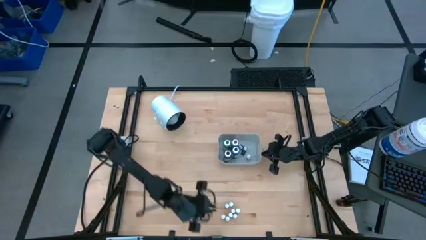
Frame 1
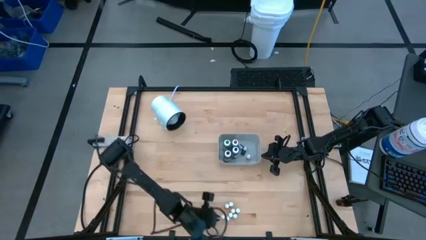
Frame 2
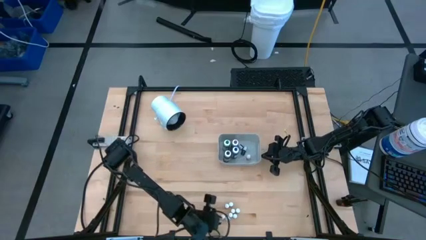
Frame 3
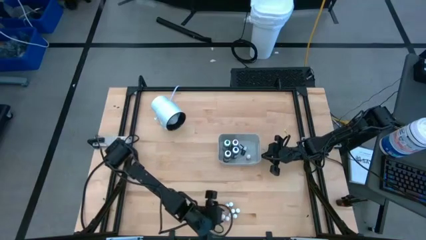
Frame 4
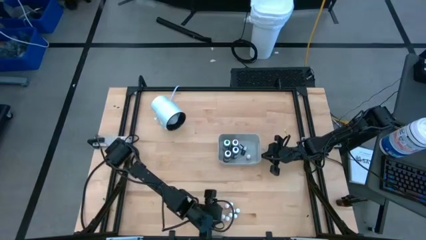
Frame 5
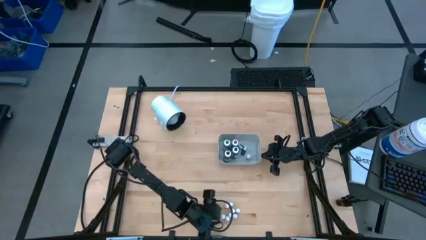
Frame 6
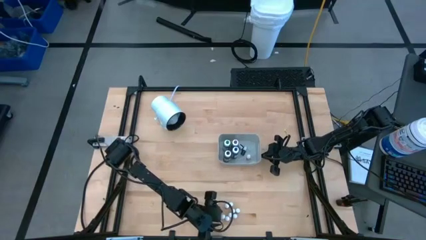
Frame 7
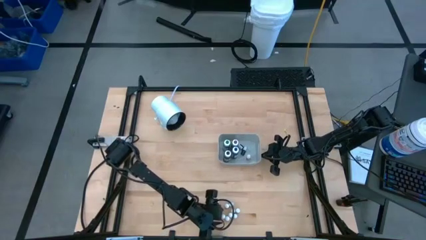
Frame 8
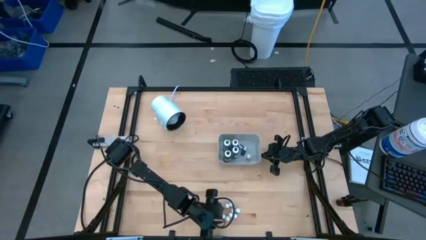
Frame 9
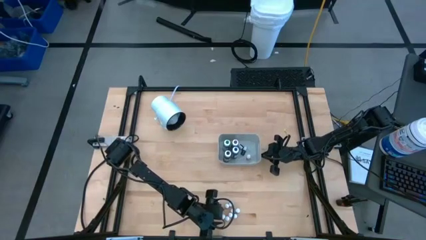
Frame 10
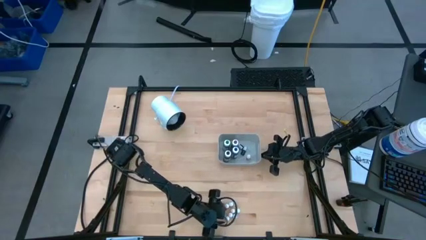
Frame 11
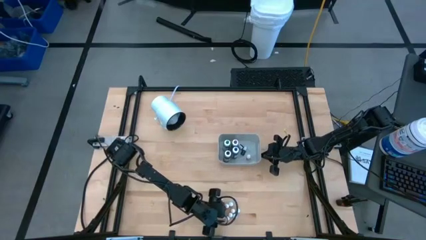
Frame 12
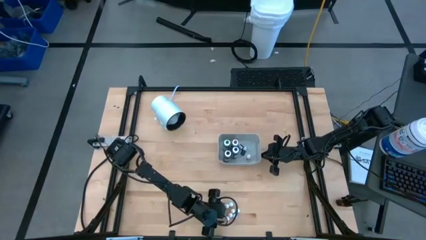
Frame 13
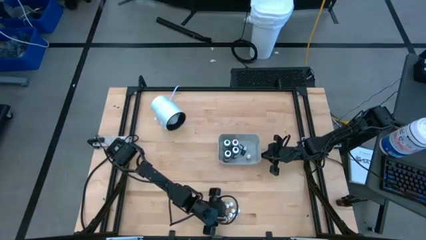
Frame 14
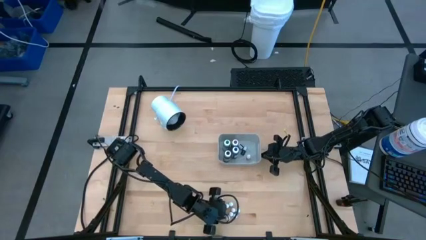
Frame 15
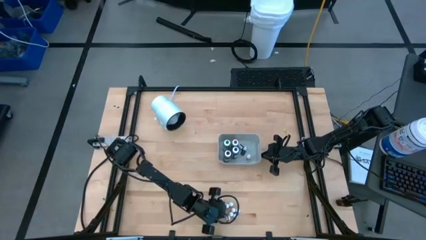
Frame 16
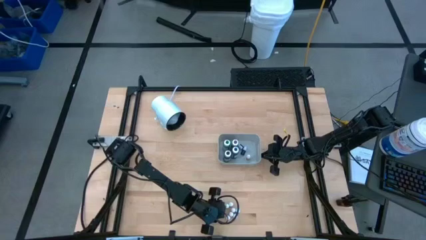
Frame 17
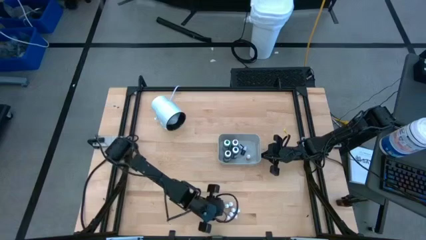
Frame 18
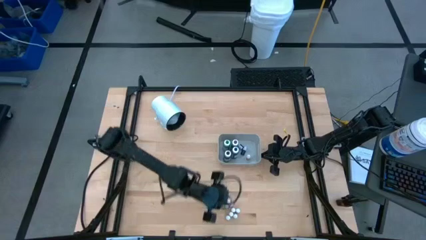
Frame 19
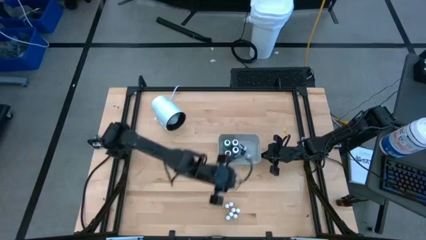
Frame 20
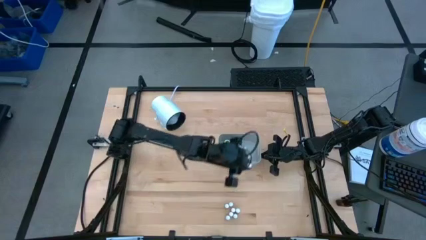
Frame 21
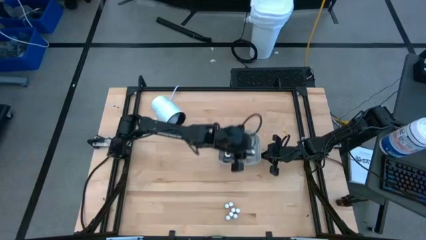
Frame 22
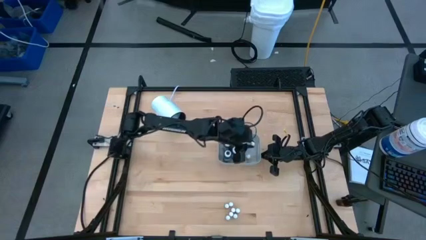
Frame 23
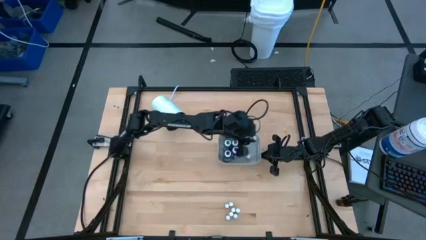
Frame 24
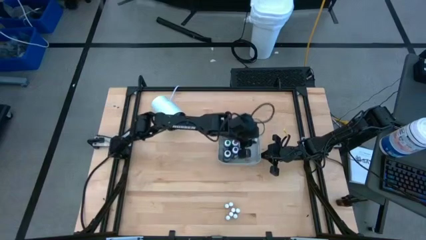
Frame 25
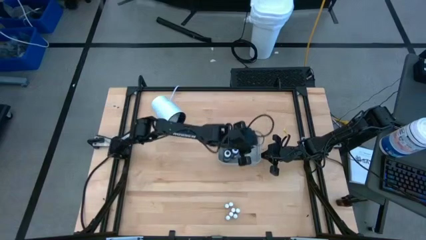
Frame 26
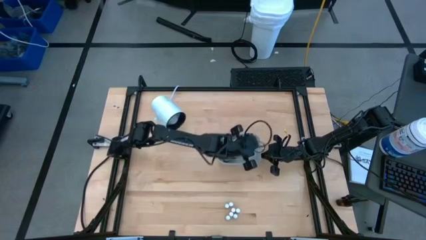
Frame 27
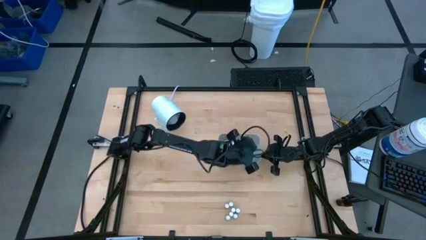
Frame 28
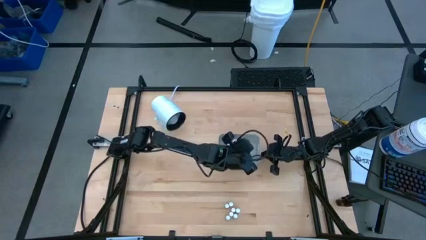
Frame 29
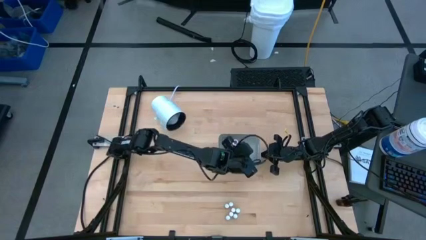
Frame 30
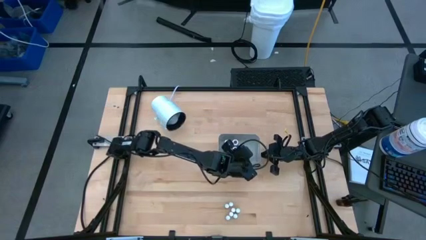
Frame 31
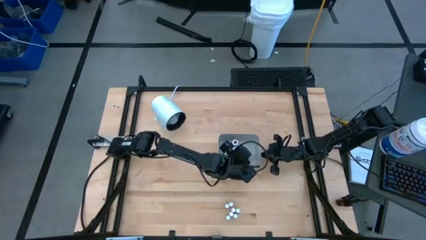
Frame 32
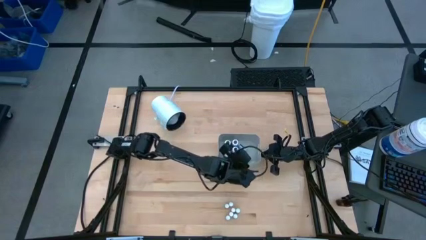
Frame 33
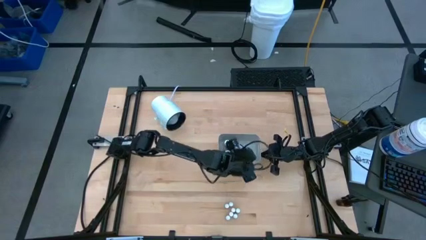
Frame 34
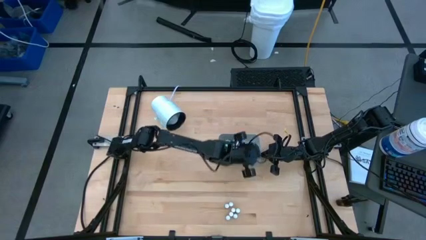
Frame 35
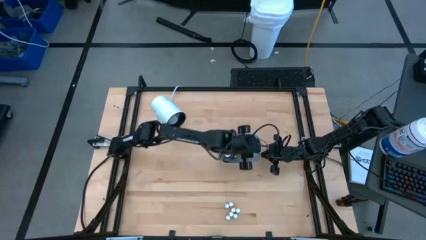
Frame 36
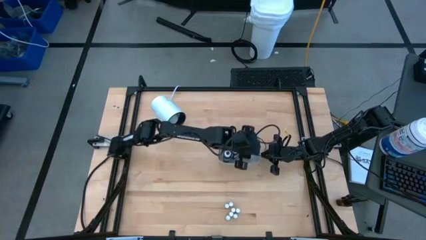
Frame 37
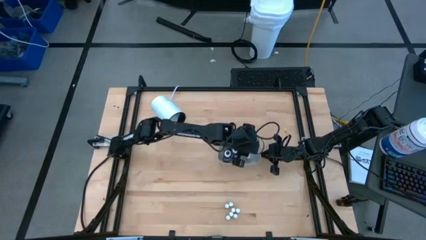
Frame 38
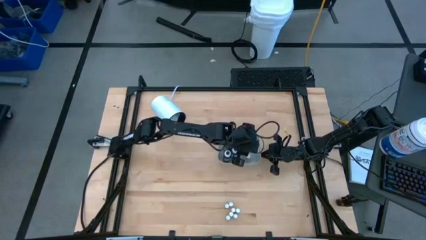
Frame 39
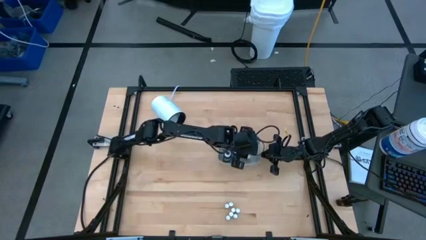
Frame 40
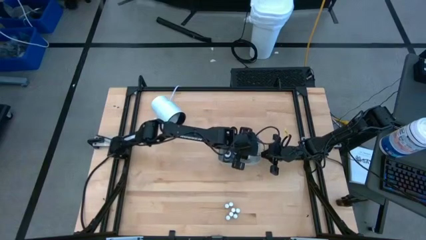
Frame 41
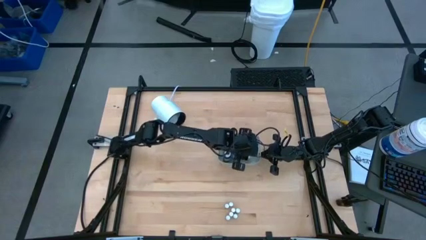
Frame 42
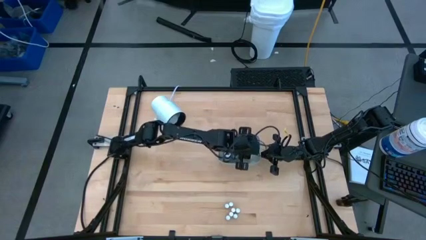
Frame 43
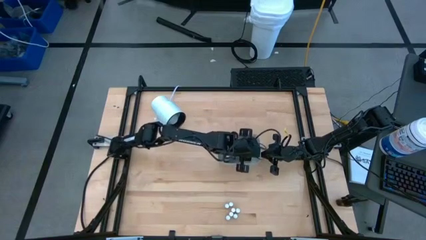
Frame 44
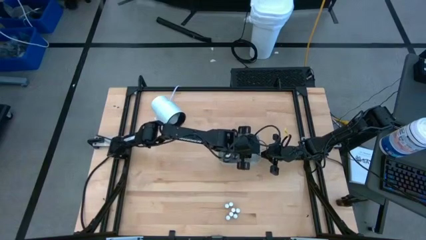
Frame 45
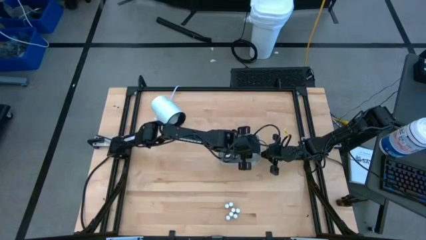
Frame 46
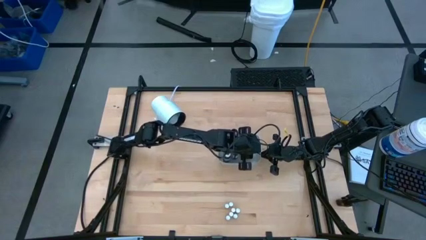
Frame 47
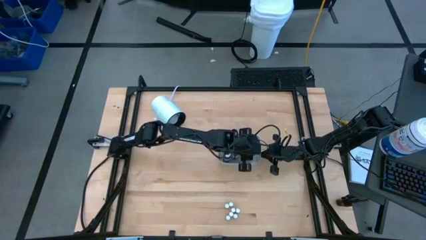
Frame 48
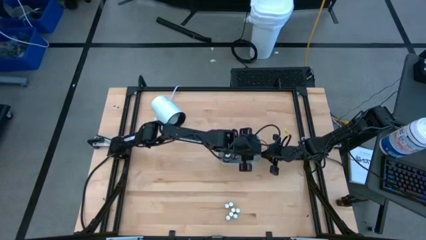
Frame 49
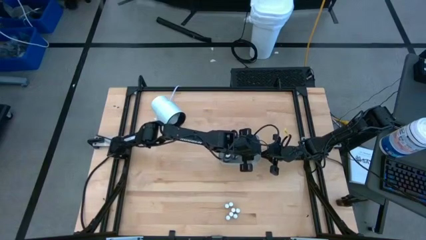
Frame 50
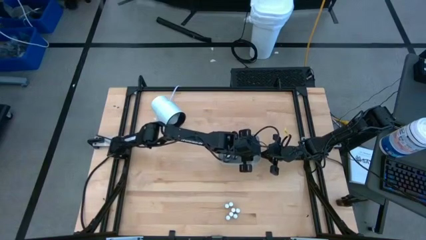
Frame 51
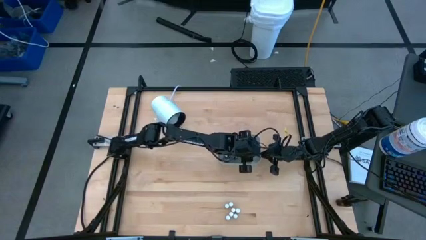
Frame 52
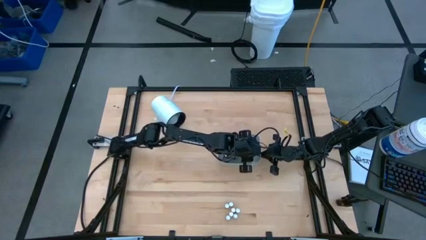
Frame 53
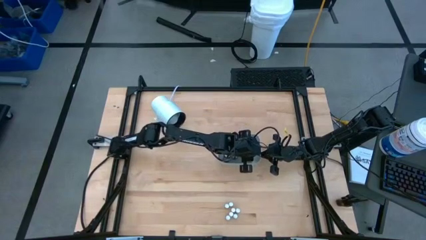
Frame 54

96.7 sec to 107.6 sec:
Task: Pick & Place food coloring
Put the small yellow food coloring bottle into the gray bin

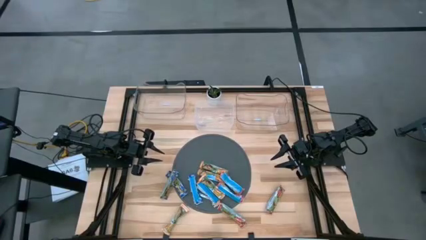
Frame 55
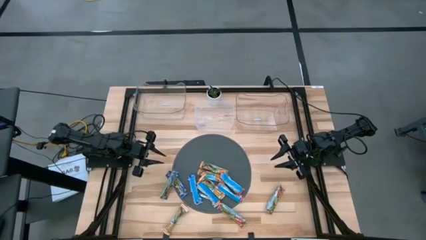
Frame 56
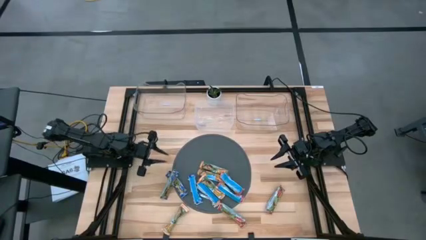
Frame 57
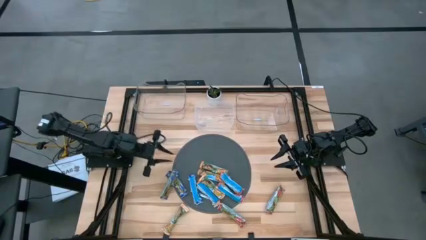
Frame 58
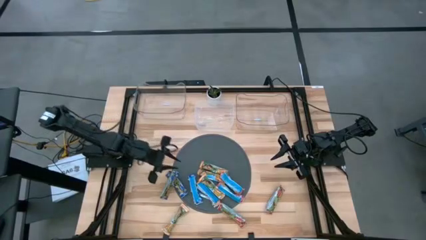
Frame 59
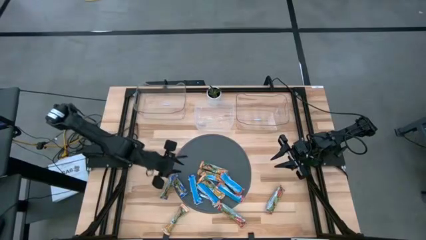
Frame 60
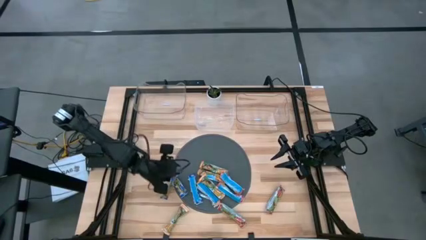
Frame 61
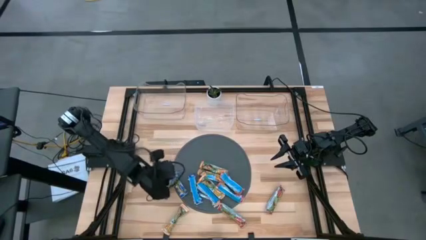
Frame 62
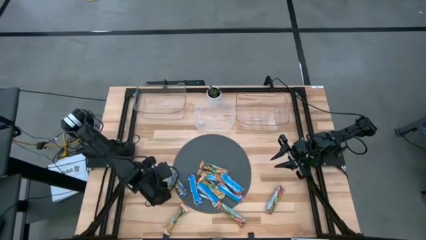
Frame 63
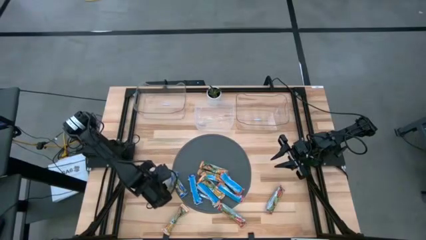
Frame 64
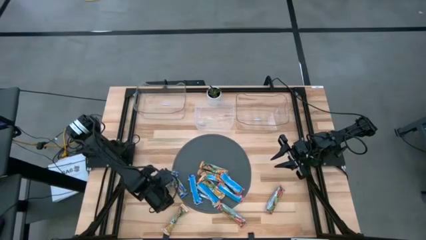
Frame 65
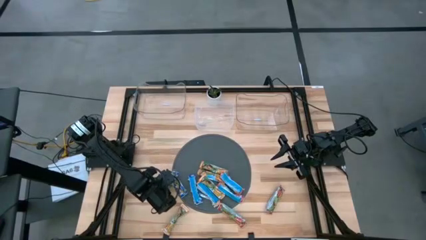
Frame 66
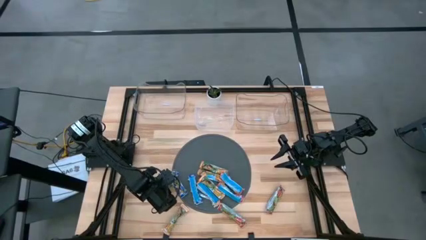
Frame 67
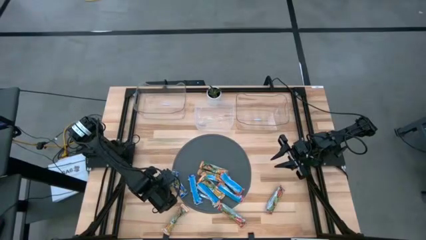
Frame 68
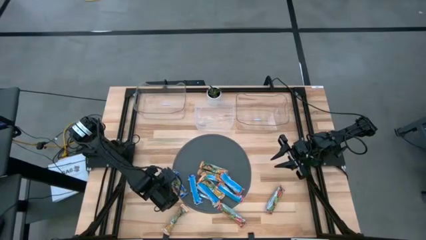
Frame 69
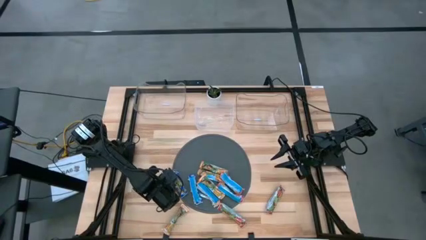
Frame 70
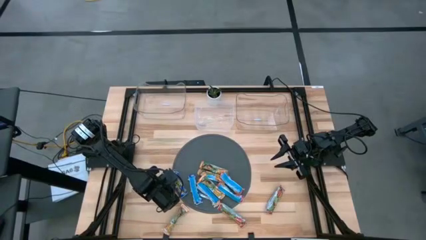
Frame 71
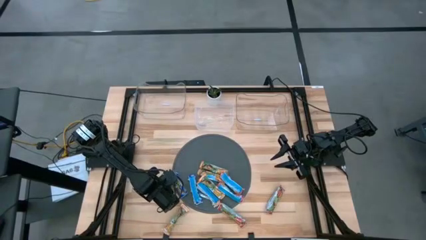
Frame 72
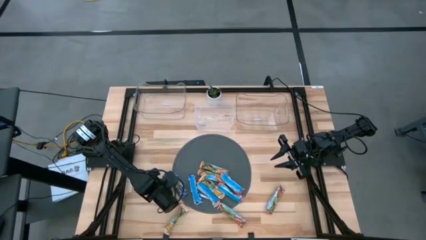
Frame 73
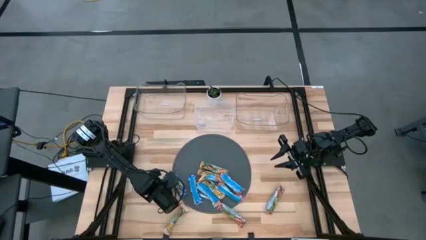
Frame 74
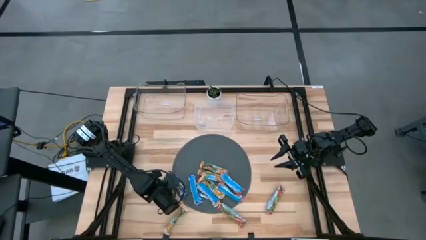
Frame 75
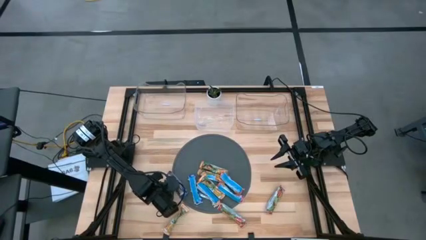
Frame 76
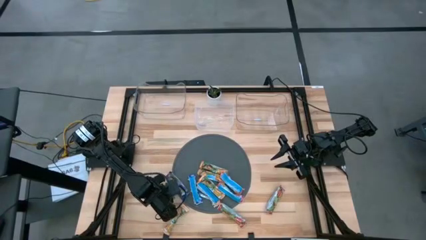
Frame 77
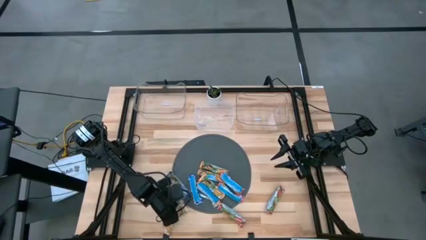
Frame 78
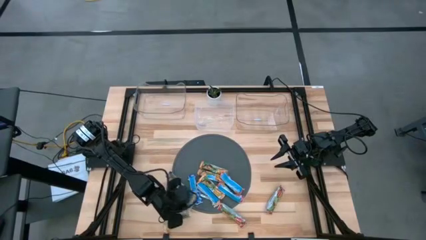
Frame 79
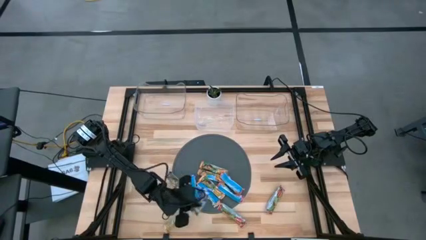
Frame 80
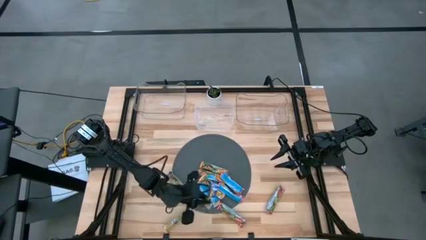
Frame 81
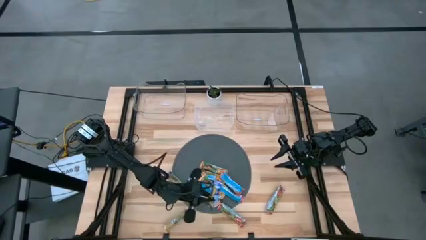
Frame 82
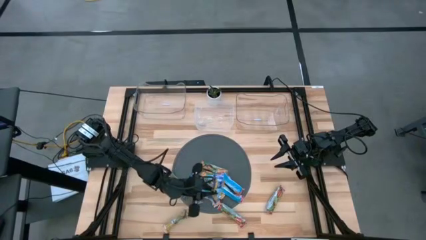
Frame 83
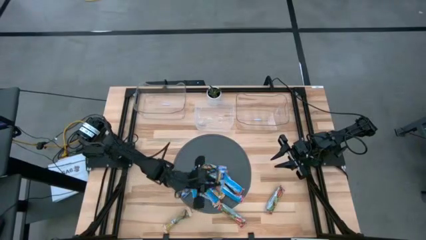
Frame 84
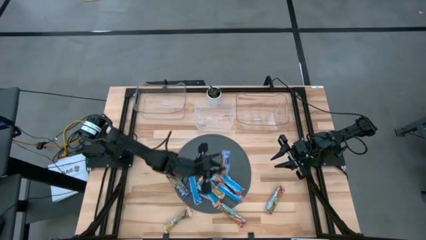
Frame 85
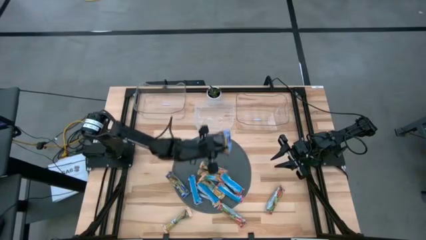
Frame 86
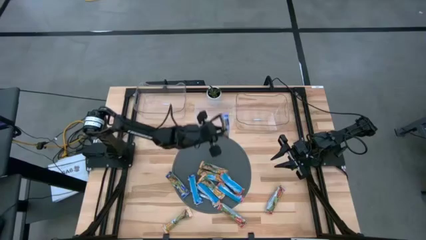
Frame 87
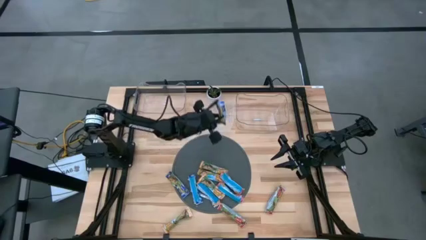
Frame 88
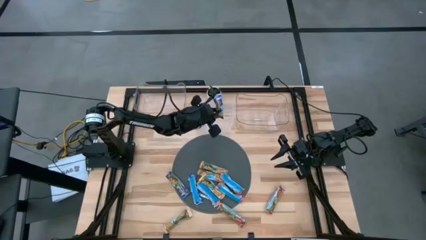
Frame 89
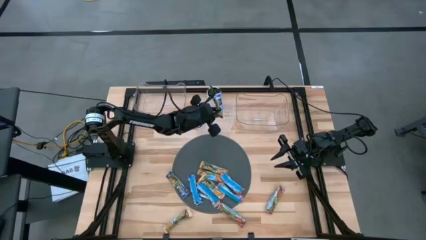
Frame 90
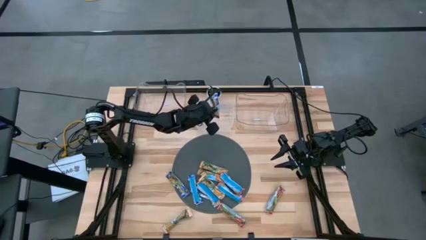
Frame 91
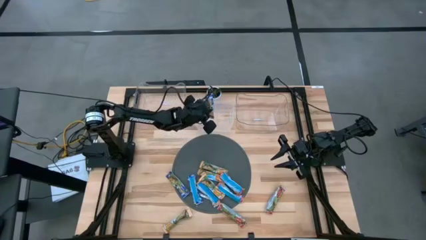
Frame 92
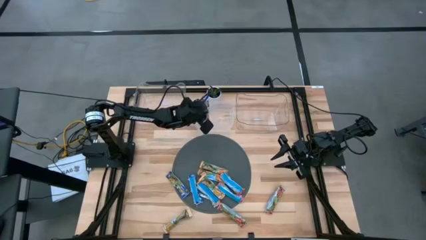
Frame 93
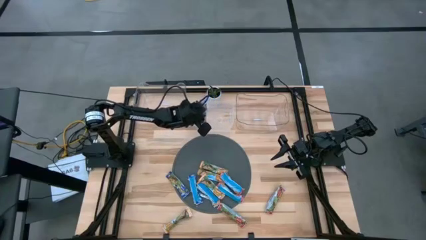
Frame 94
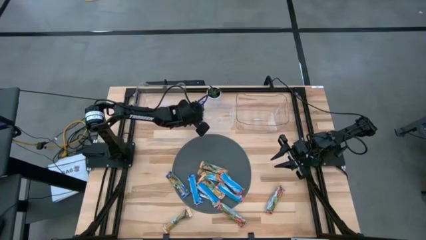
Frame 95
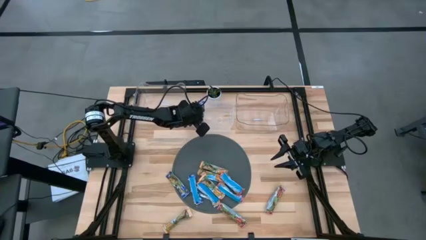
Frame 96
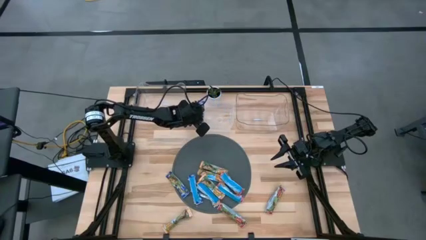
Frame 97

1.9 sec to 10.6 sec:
Task: Pick and place Granola Bars by type
Put the blue granola bar into the middle transparent bin
